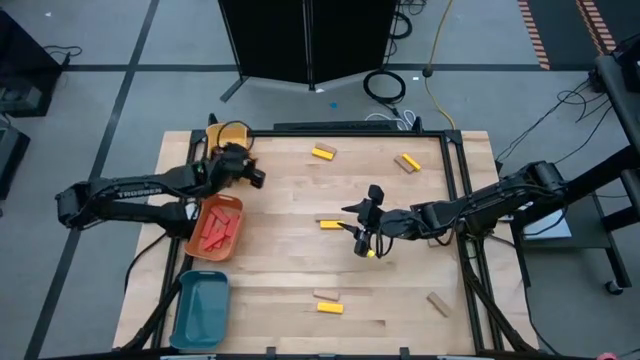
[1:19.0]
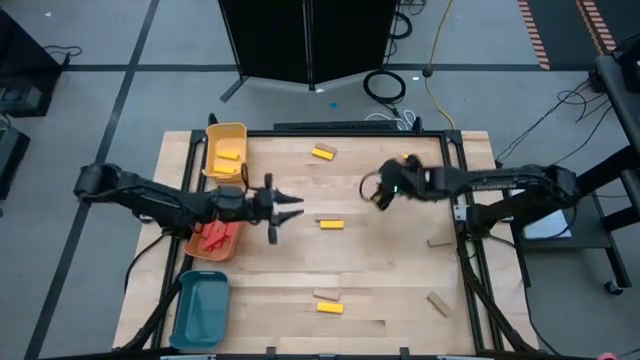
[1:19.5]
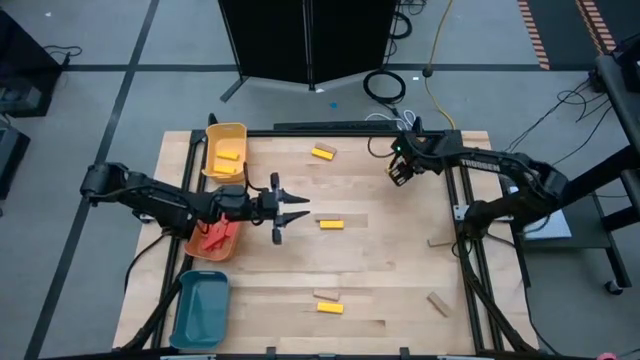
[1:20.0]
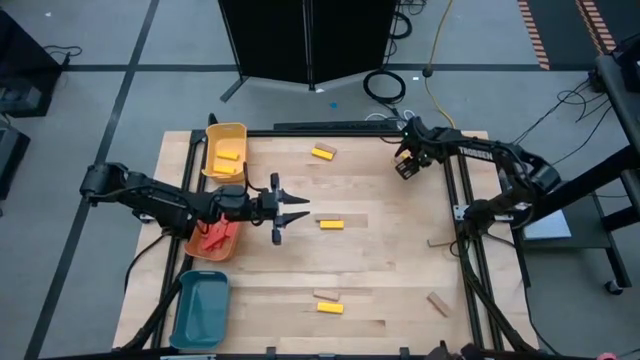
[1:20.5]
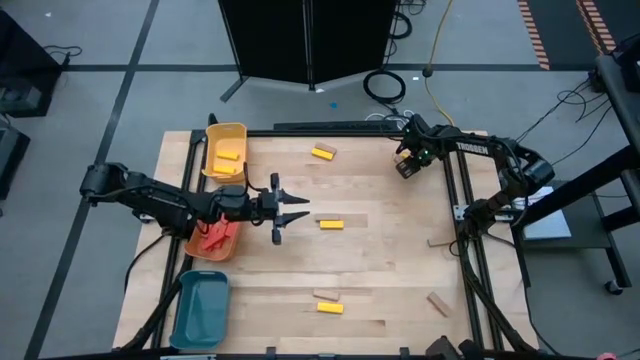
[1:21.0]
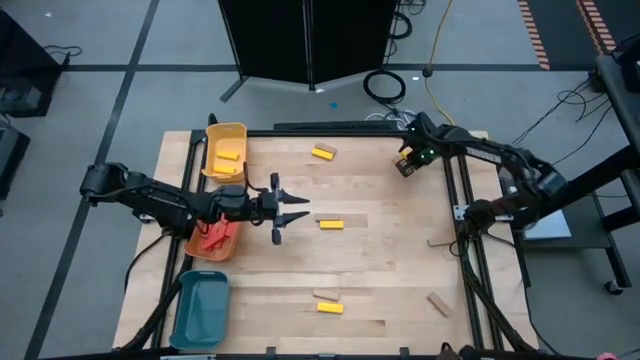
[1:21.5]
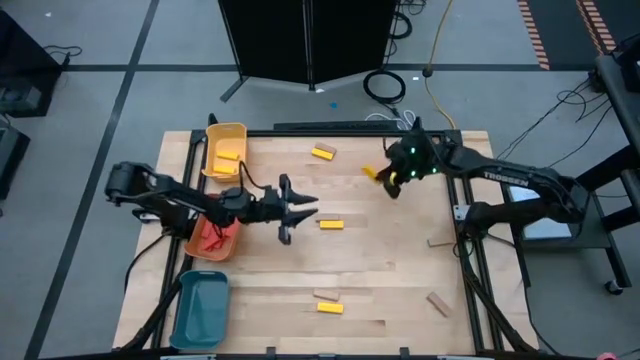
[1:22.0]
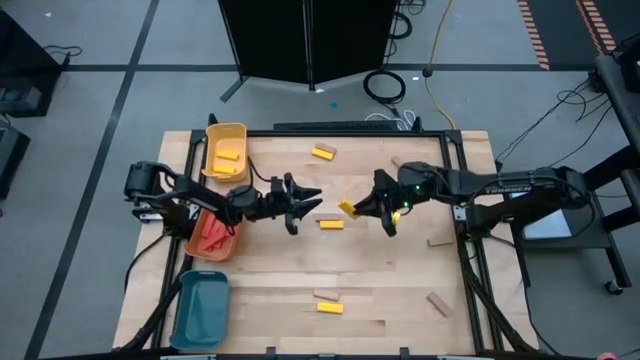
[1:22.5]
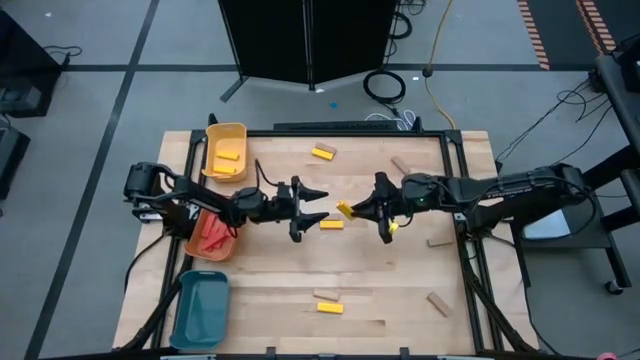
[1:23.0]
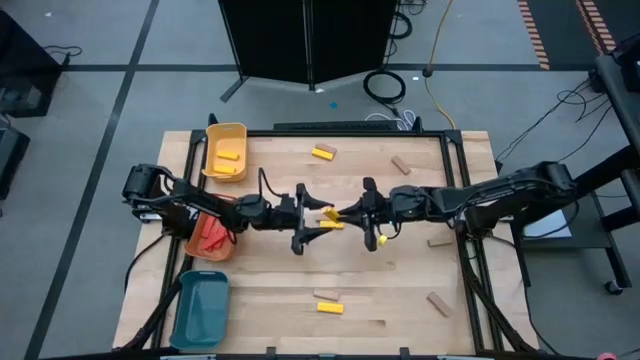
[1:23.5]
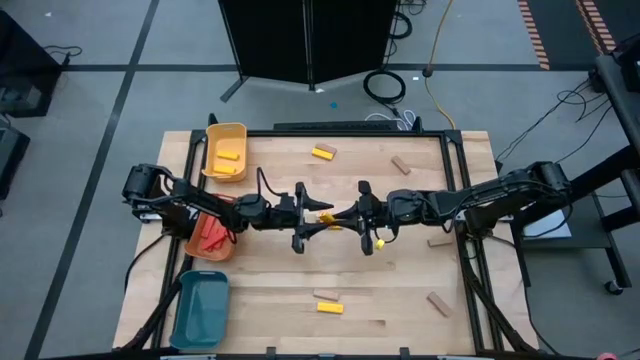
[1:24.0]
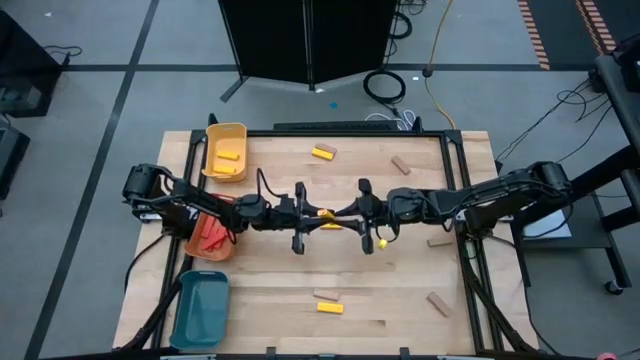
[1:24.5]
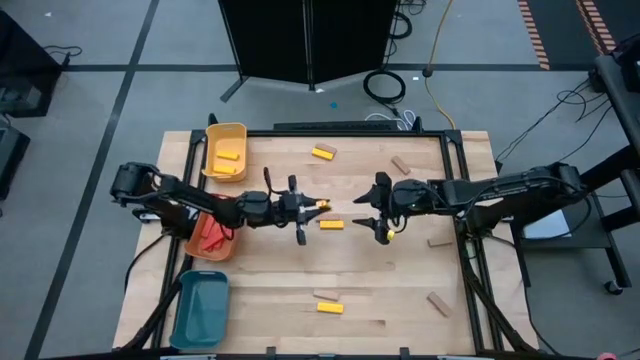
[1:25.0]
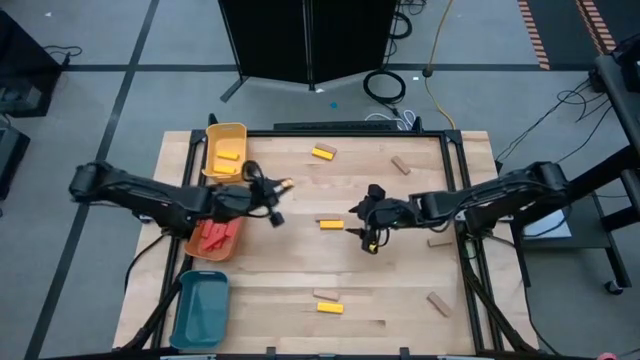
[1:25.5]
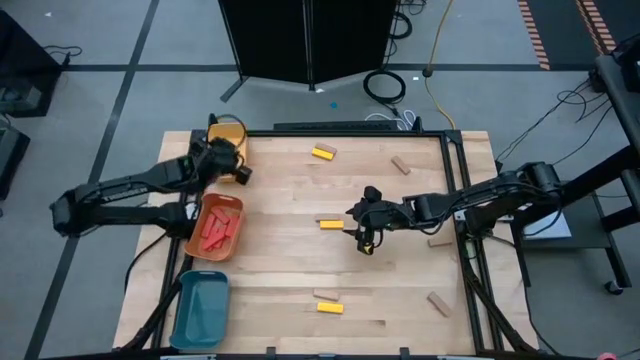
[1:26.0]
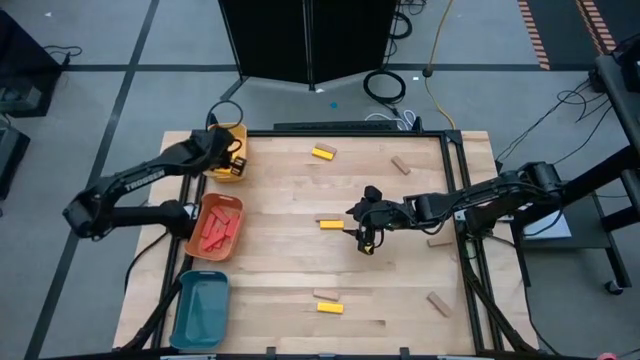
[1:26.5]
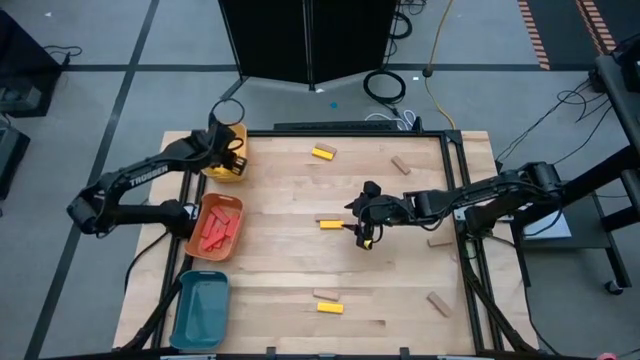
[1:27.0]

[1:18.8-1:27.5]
Task: Sort blocks
Put the top right yellow block in the yellow bin

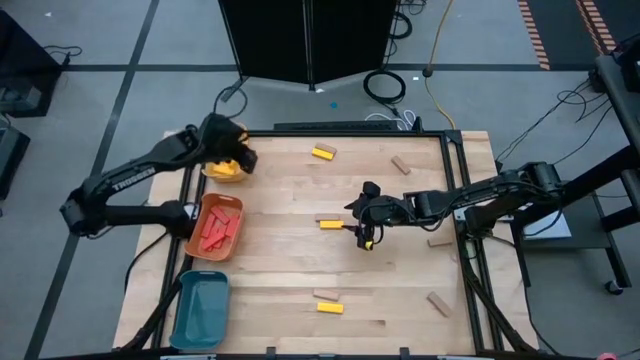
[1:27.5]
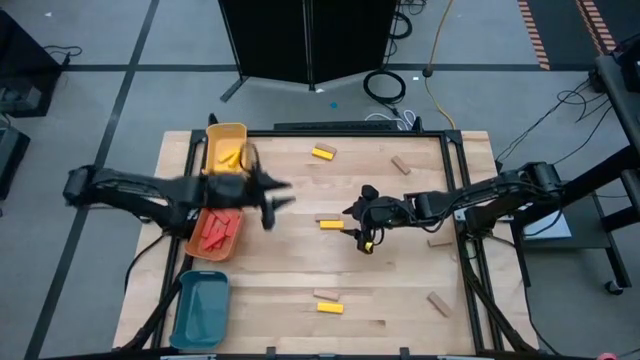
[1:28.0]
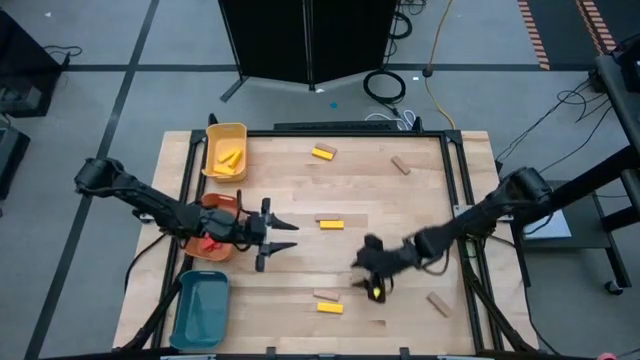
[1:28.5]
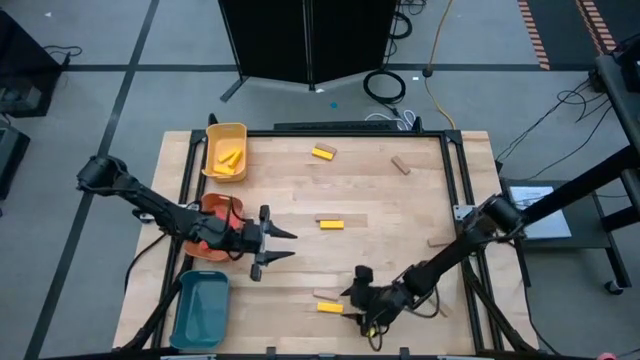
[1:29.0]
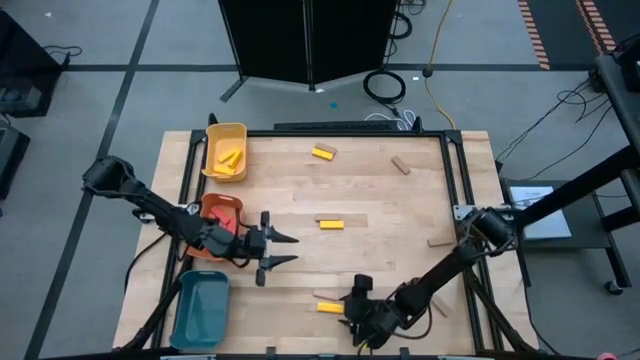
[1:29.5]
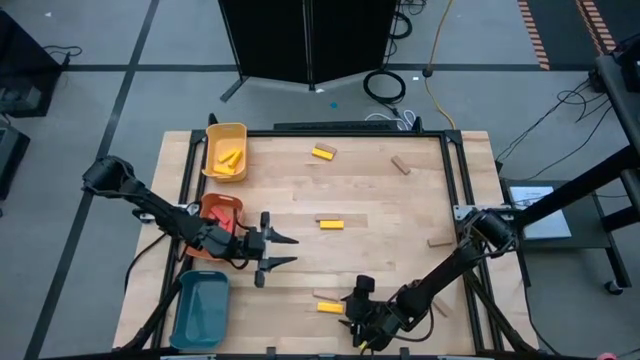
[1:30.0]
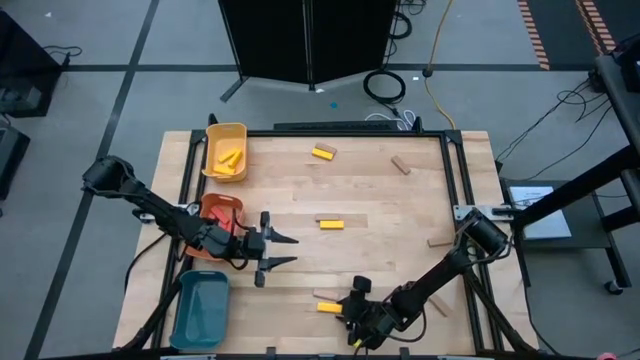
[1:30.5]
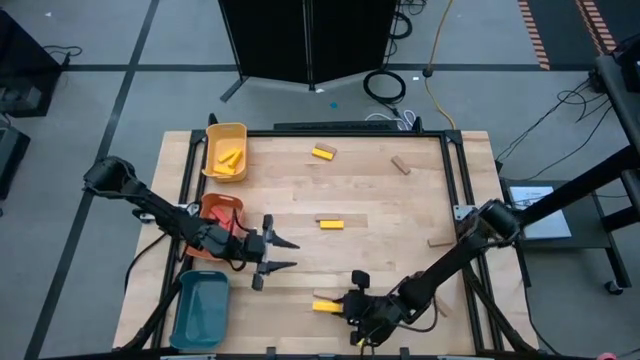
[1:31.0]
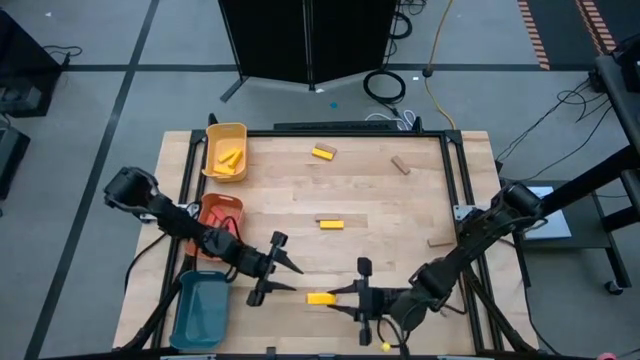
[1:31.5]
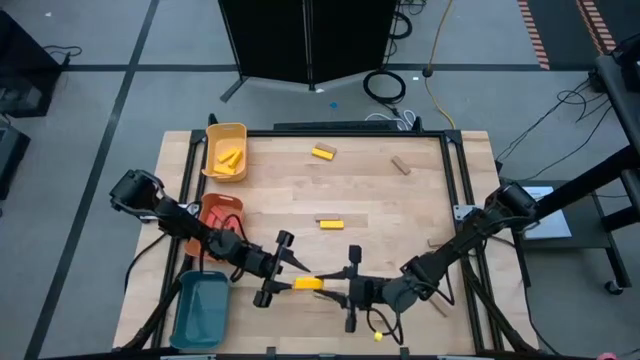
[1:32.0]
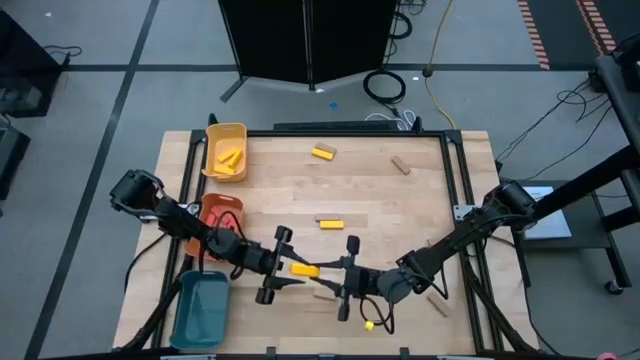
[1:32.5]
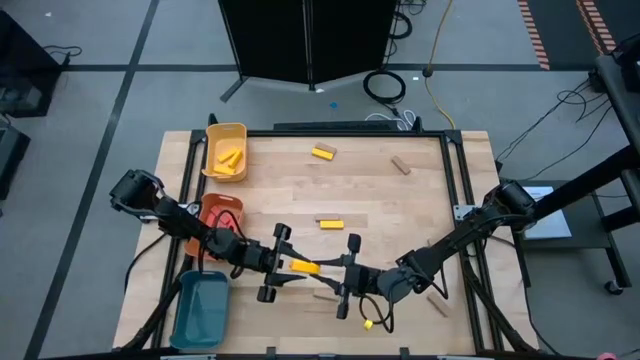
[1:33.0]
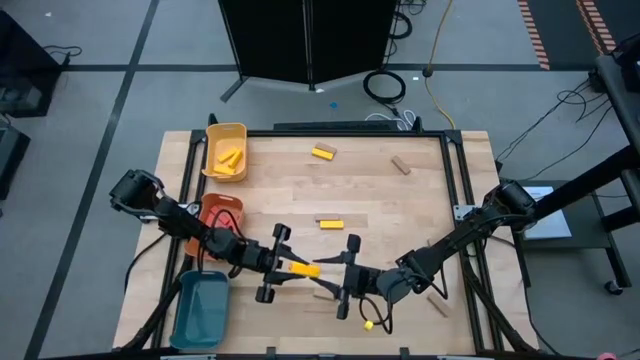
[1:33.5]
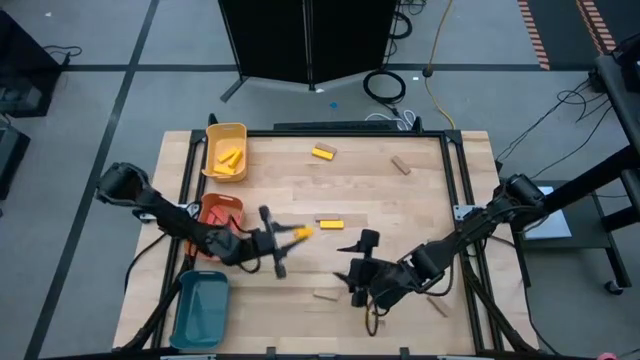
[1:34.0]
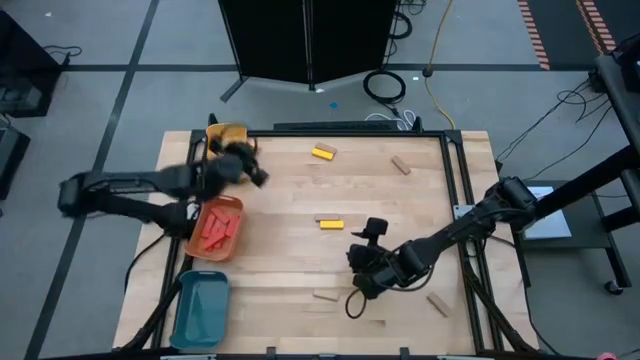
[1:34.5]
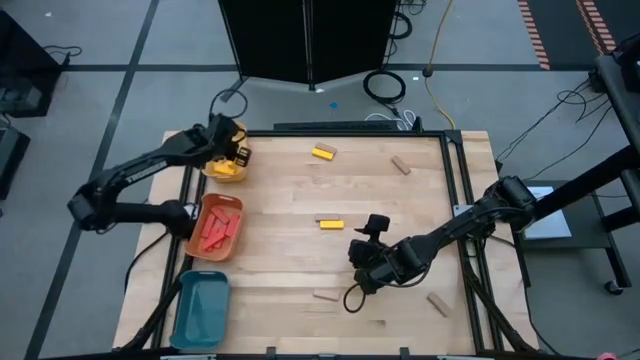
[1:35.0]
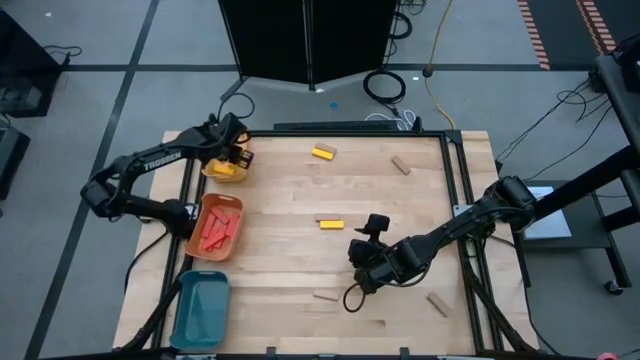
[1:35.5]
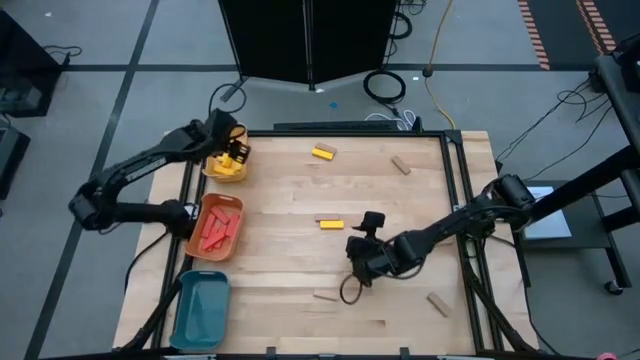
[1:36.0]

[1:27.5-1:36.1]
Put the bottom yellow block in the yellow bin

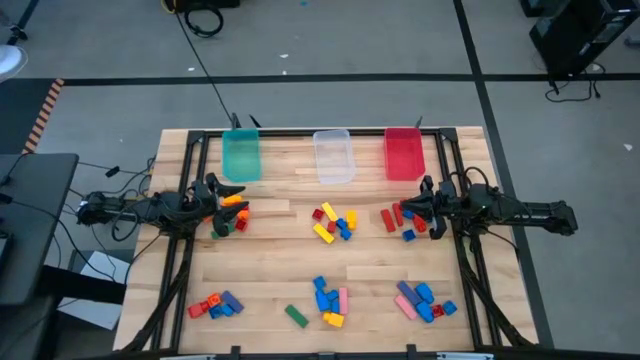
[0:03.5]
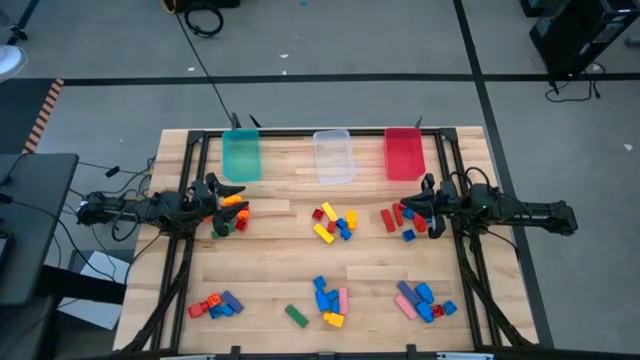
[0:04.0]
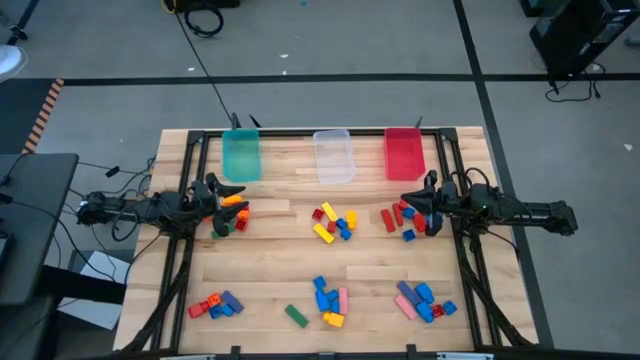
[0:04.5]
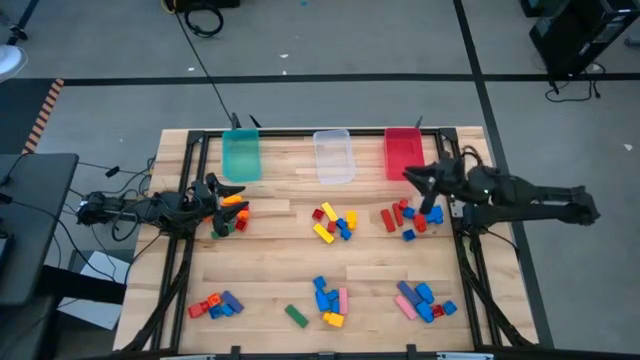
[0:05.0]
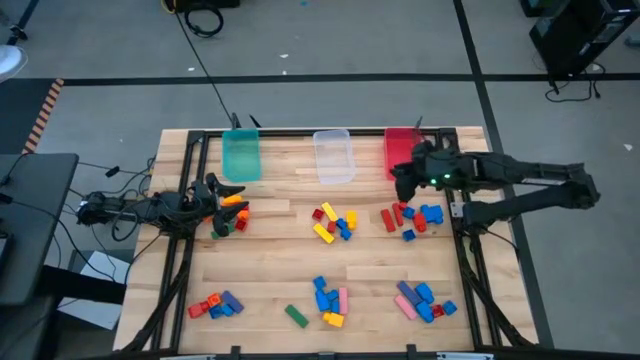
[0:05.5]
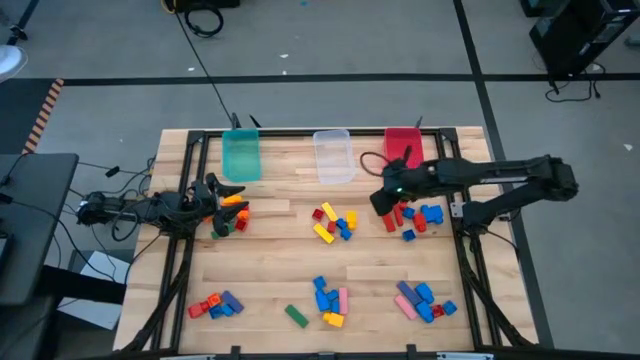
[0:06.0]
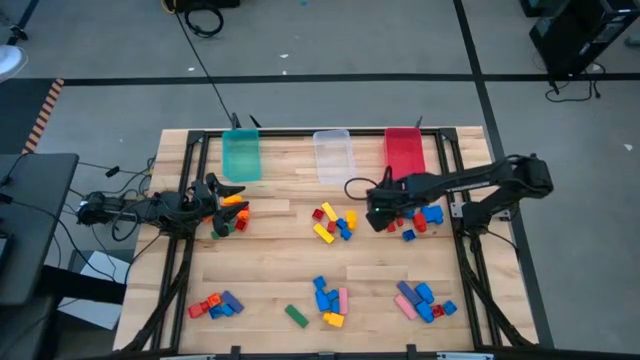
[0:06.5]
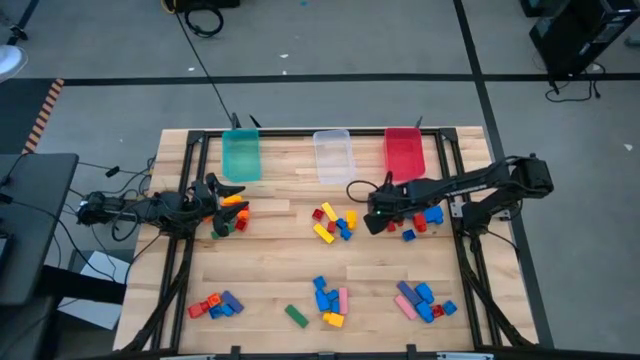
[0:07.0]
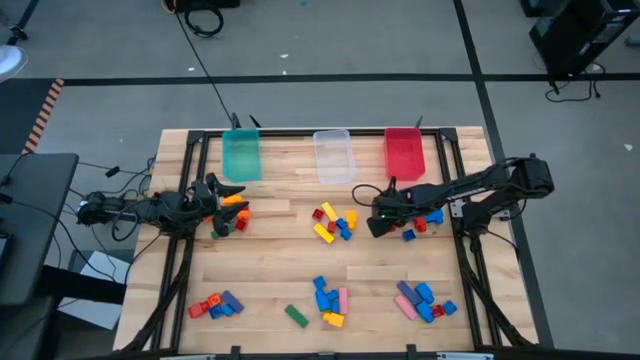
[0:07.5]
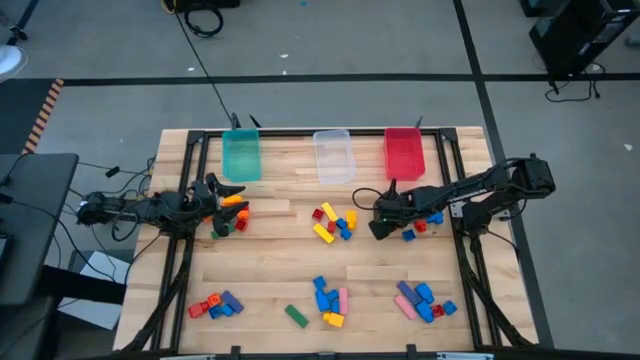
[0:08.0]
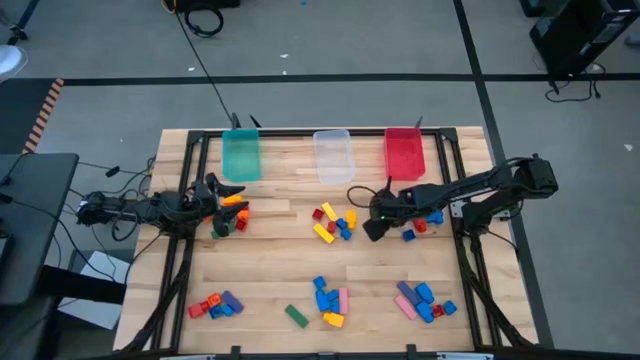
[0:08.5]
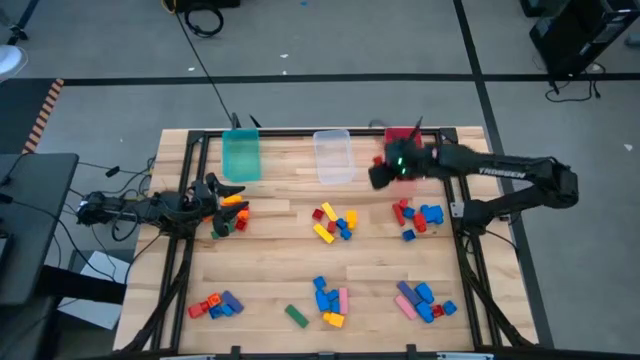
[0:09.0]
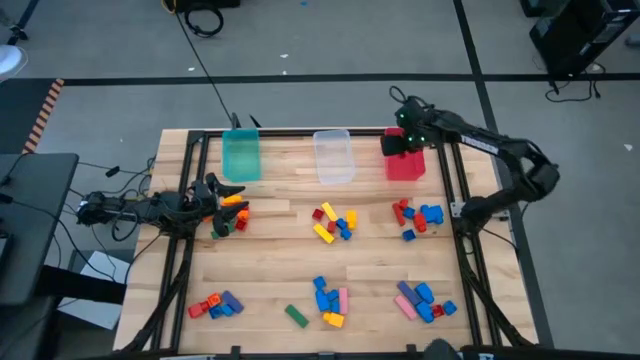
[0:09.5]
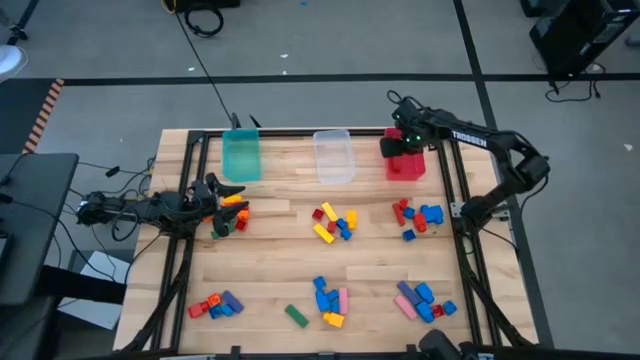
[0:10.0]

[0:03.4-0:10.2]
Task: Sort blocks by size
Put the red block into the red bin
